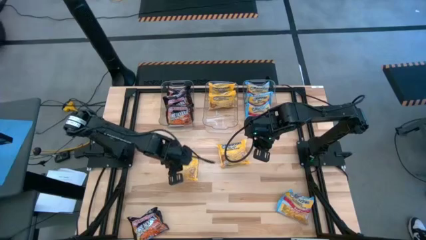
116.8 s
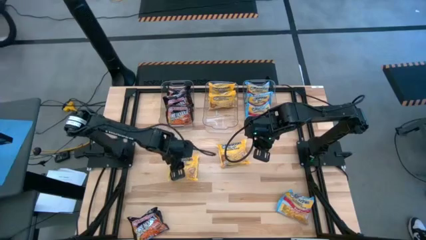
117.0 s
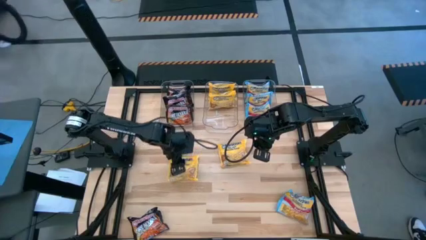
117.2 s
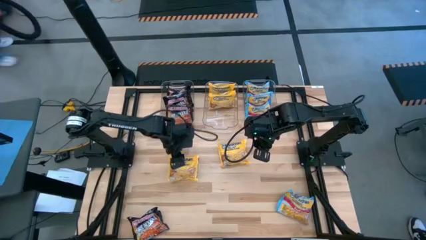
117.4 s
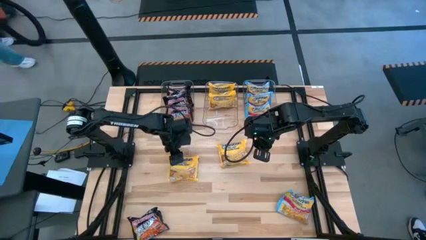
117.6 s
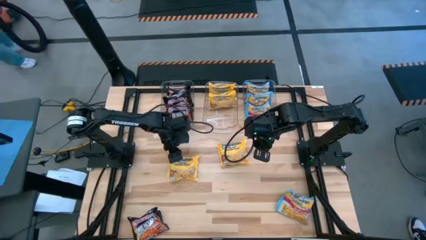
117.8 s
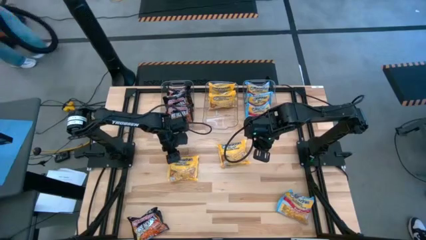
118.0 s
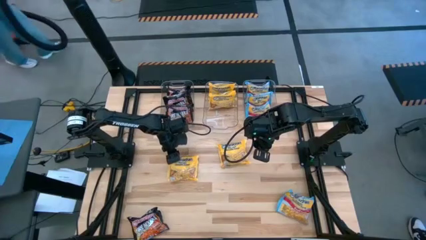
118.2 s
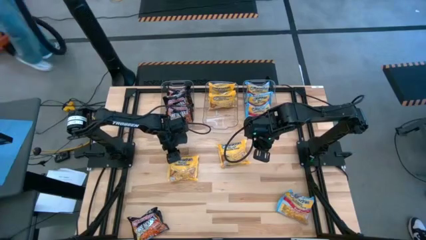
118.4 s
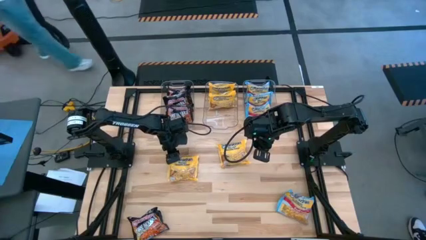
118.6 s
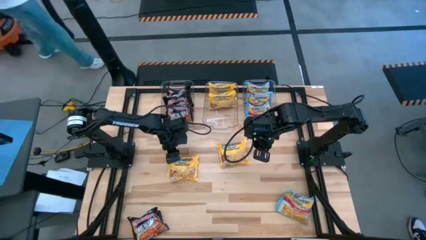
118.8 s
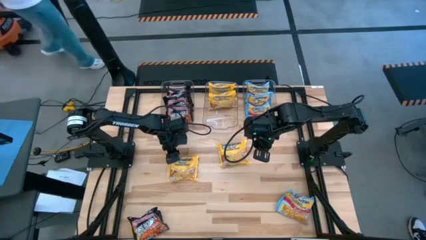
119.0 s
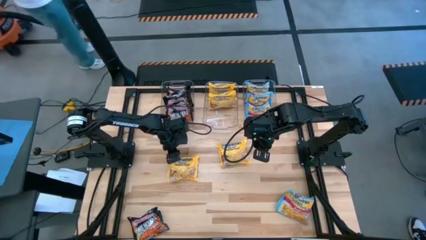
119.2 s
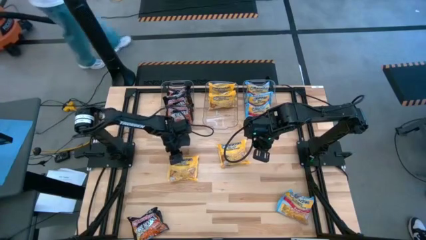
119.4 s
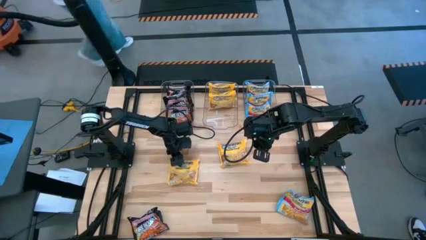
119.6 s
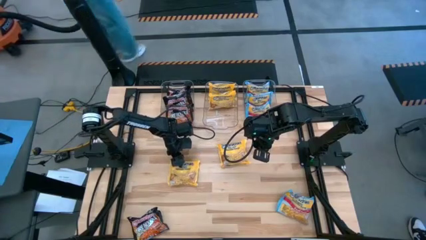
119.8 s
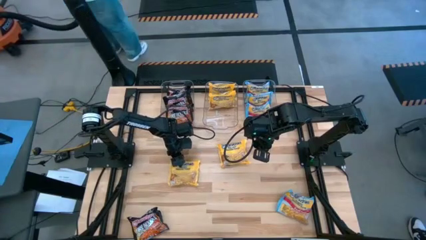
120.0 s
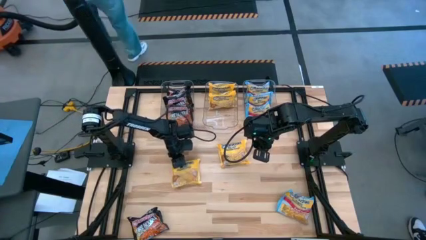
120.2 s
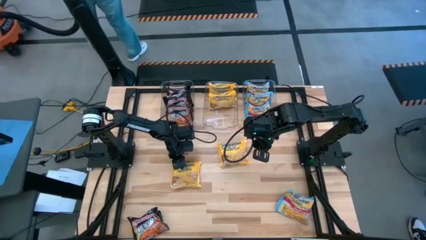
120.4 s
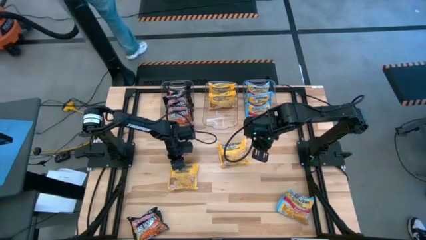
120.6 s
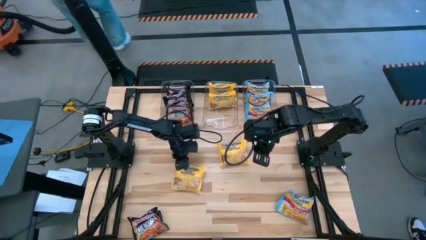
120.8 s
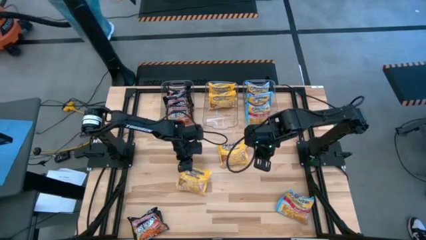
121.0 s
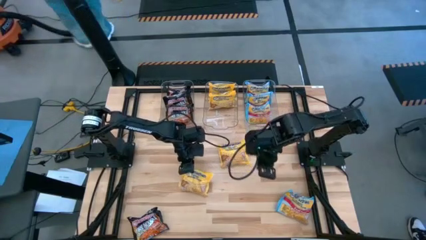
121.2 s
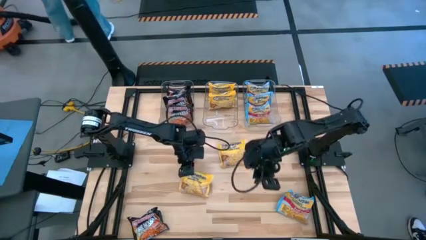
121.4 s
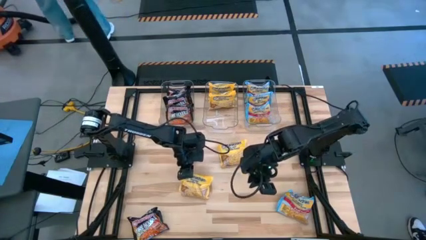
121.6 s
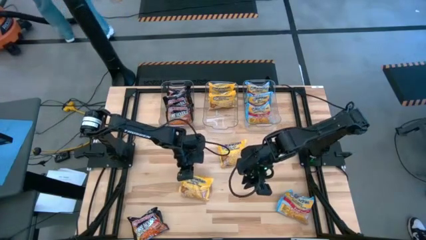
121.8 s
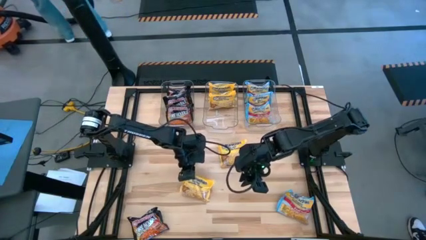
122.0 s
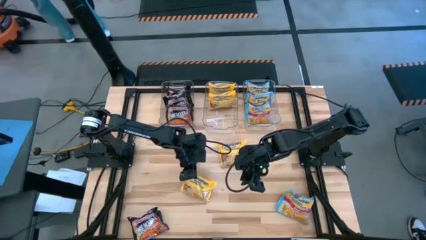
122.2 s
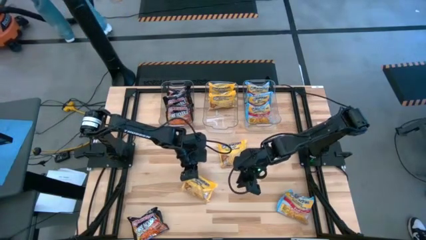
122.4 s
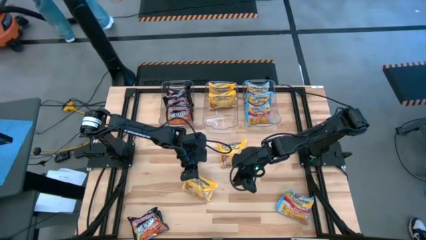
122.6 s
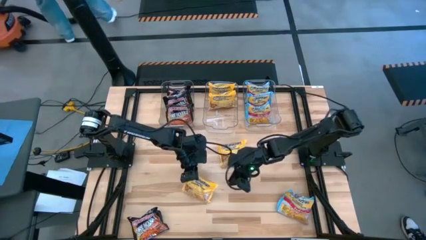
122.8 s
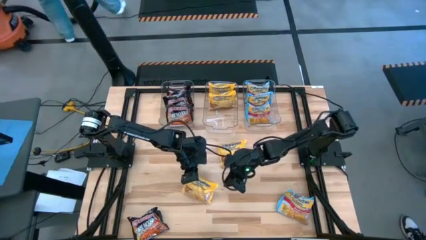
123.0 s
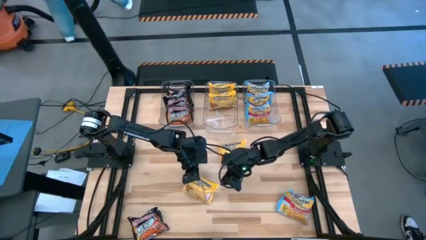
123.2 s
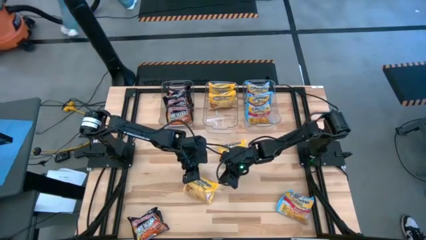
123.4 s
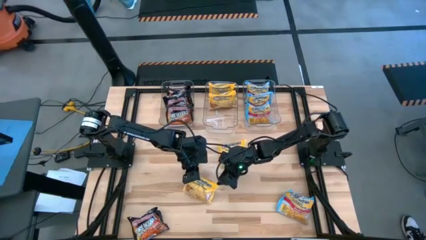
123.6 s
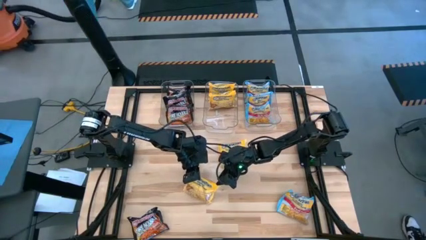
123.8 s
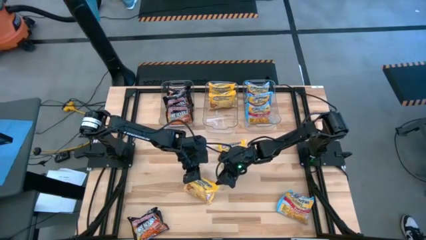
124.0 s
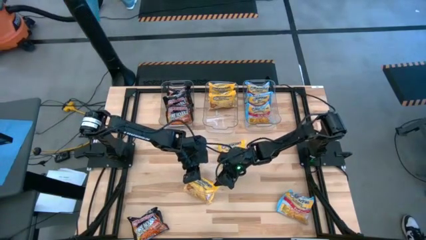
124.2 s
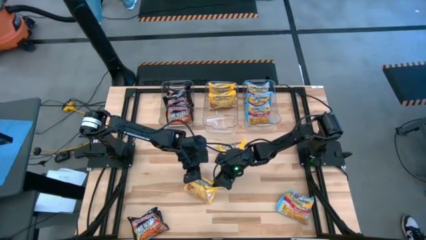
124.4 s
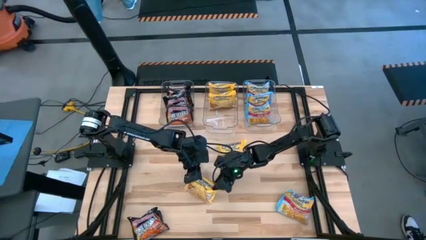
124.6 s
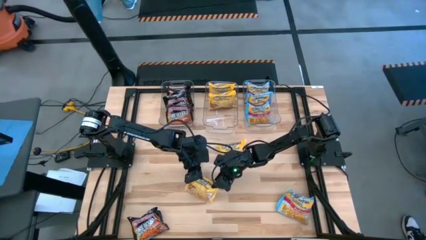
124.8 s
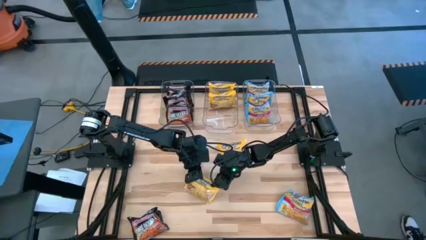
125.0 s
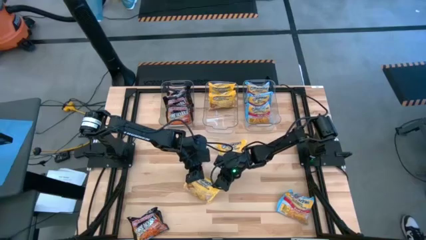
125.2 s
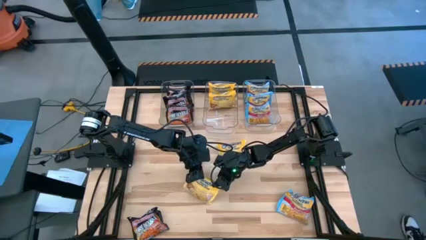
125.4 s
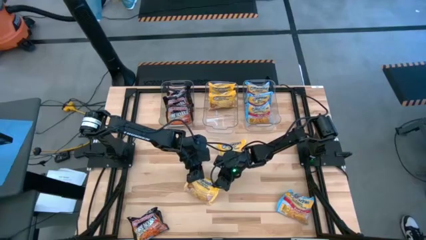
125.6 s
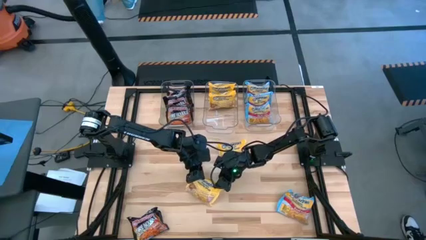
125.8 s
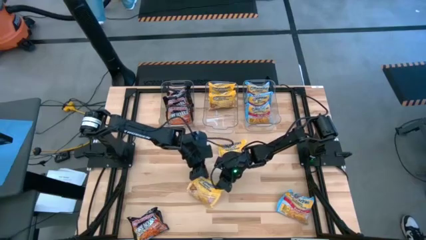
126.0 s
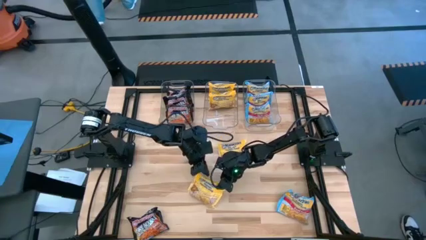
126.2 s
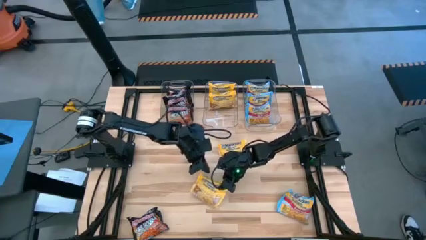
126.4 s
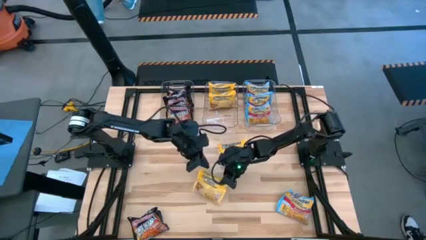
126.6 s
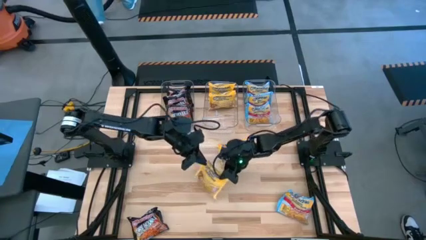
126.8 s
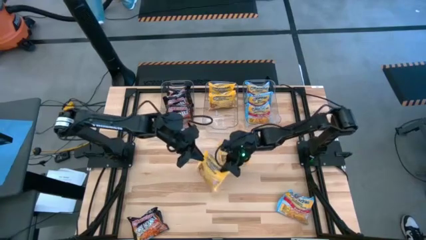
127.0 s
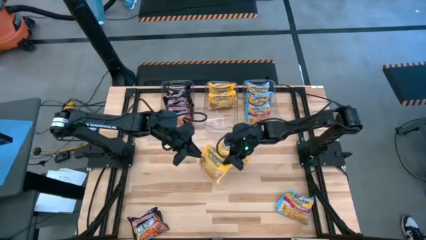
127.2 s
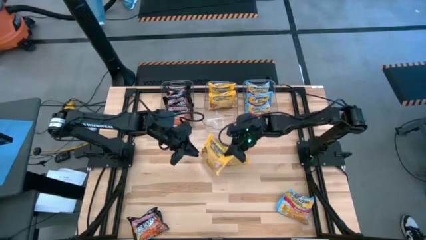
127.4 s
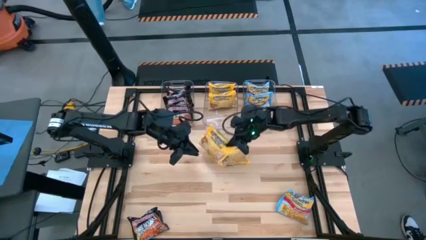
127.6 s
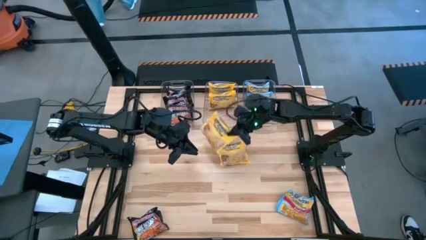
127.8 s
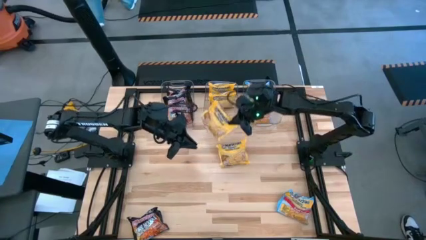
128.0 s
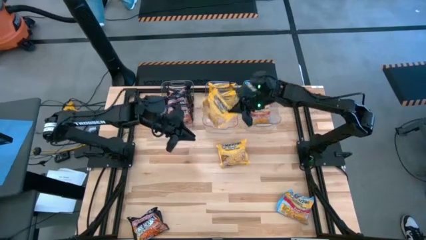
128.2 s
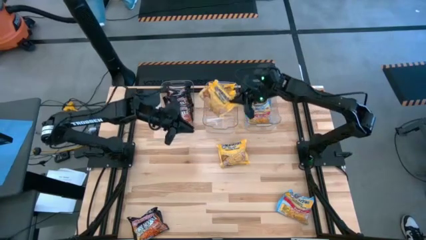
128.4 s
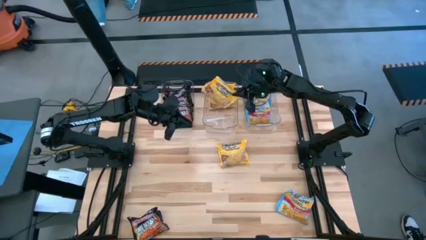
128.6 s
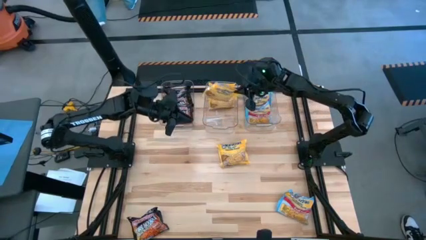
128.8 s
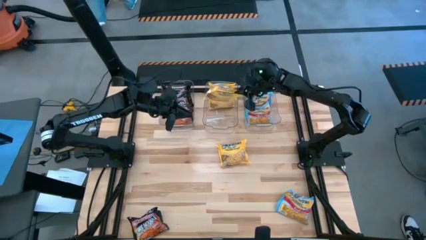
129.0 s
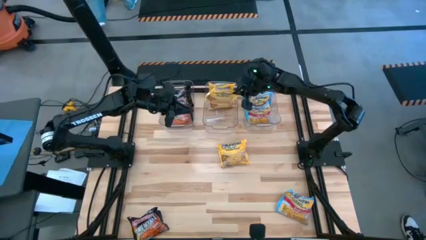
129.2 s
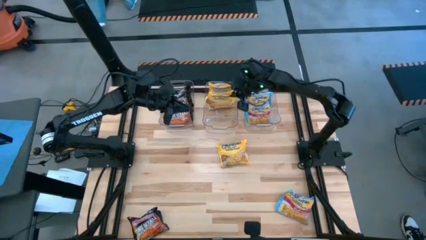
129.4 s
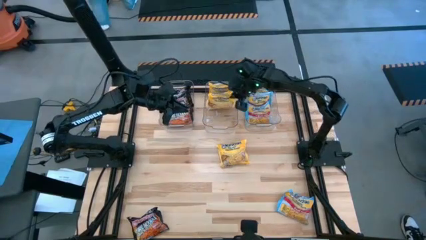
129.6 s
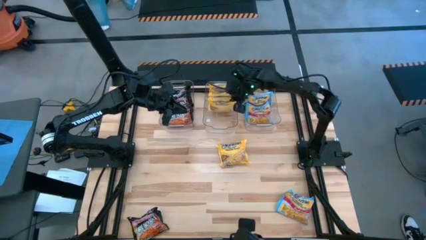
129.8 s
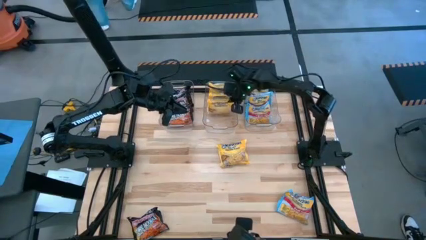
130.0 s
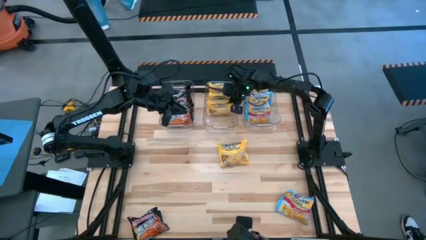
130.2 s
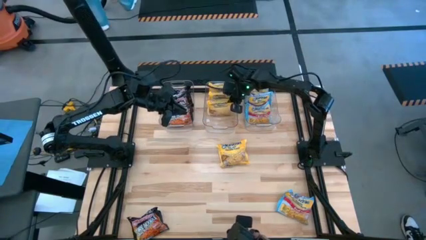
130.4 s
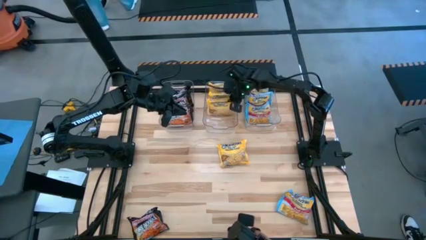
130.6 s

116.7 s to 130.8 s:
Task: Sort Maruchan noodles
Put the yellow noodle pack into the middle transparent bin

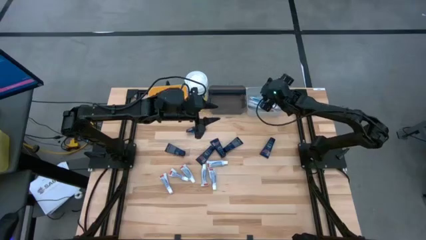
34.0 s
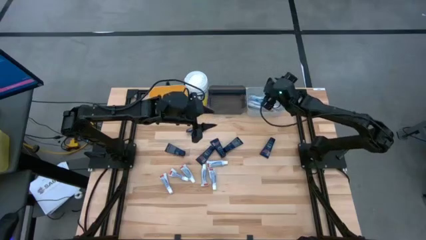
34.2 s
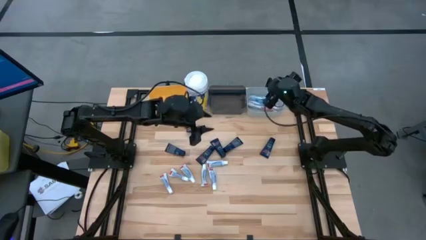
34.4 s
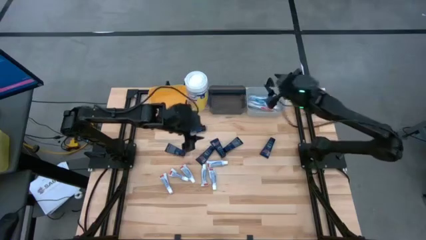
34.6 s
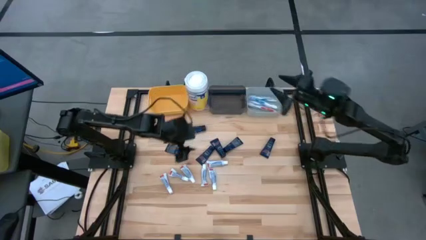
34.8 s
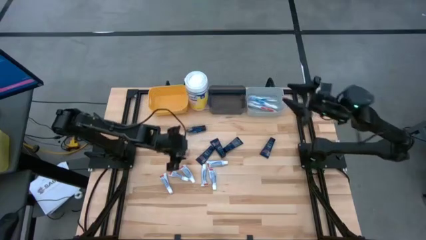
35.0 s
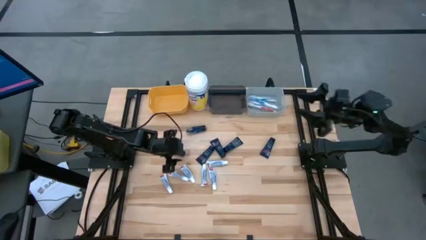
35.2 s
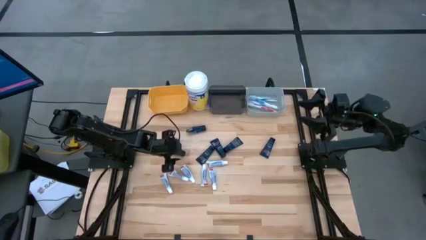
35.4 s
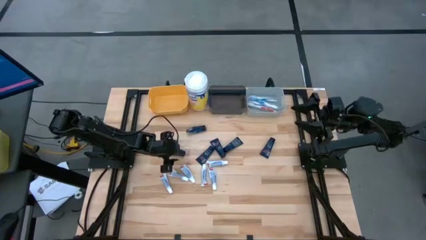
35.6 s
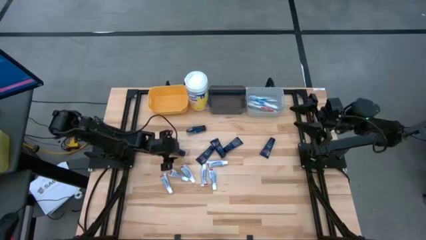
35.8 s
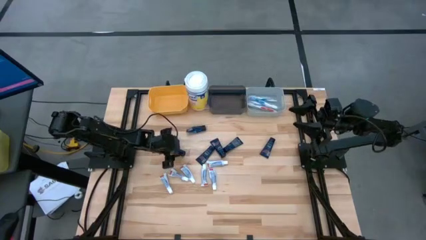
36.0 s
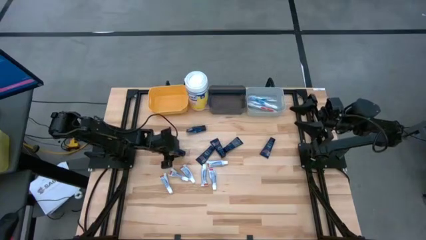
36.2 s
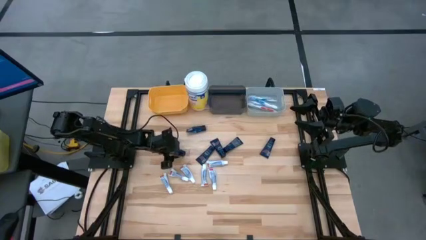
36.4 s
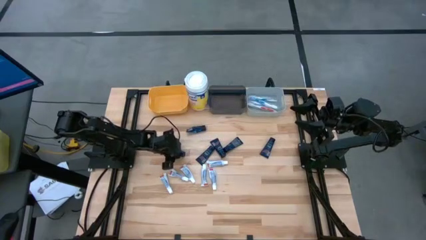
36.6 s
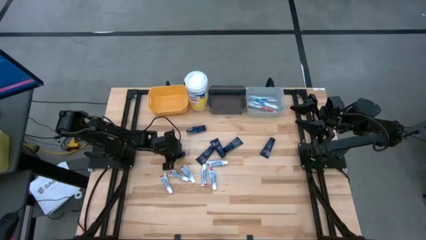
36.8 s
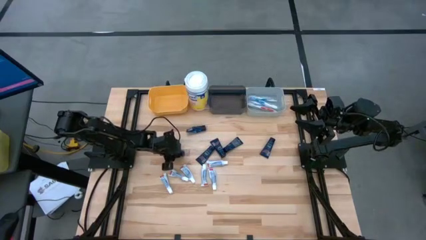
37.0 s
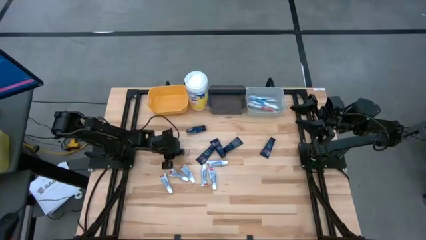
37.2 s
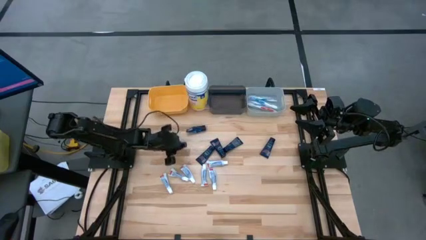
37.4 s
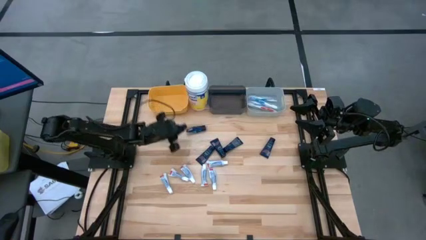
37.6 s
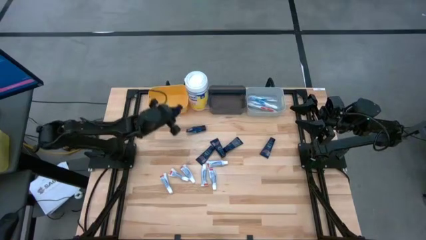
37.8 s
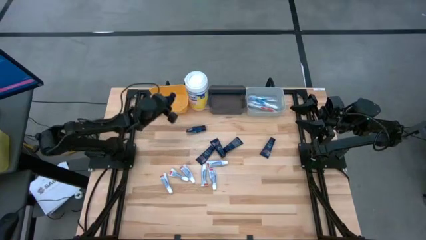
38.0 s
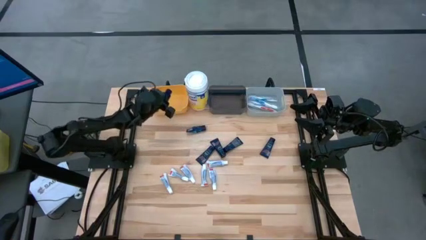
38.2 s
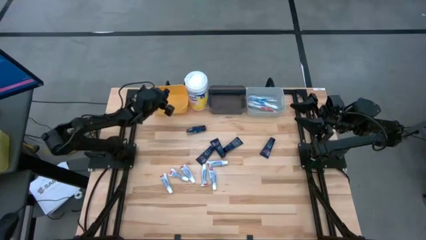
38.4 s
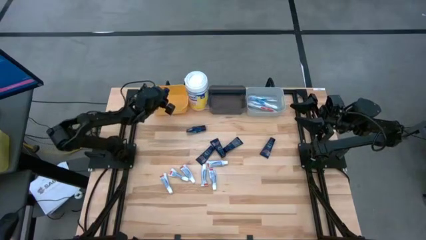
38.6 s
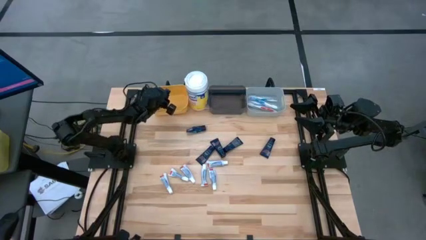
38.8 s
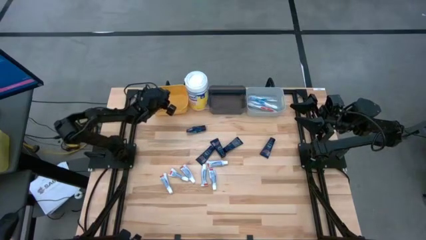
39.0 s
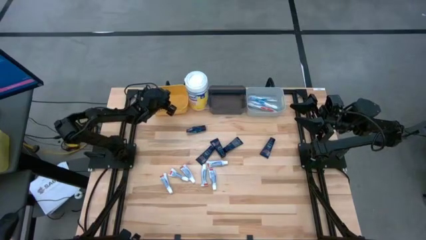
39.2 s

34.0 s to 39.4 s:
Task: Pick & Place Travel size toiletries
Put the blue shave cream into the yellow bin
